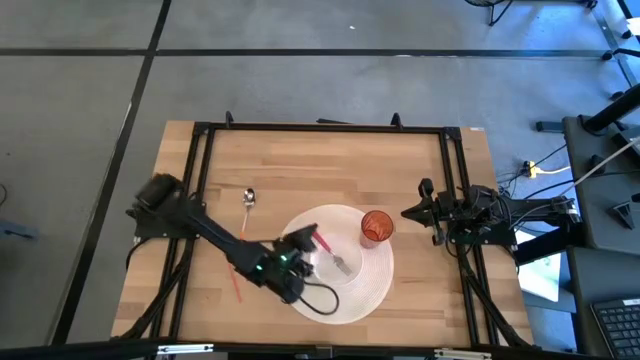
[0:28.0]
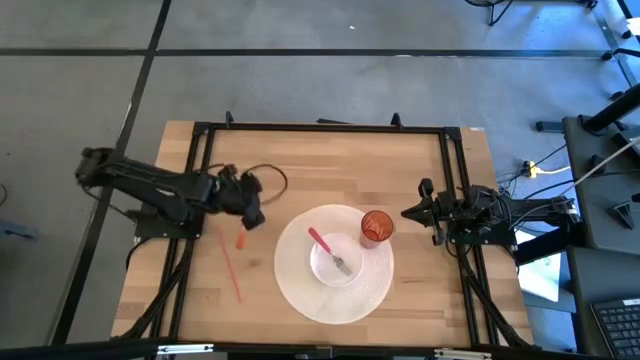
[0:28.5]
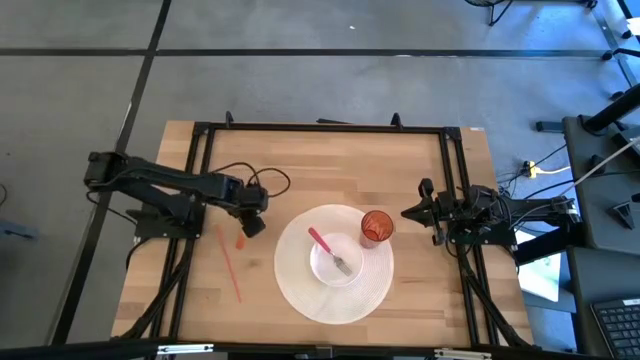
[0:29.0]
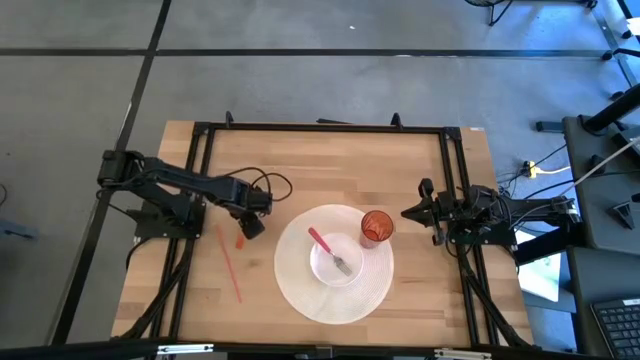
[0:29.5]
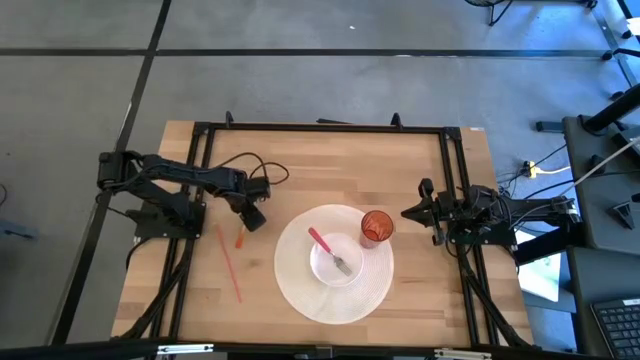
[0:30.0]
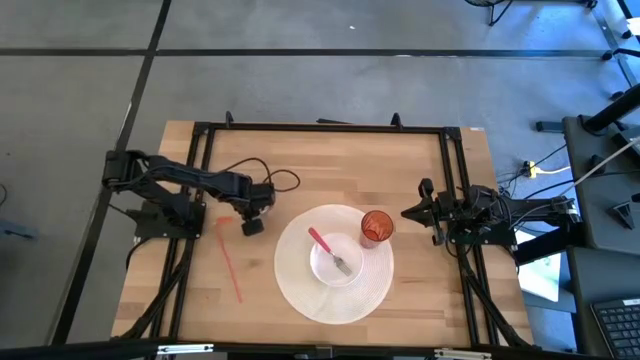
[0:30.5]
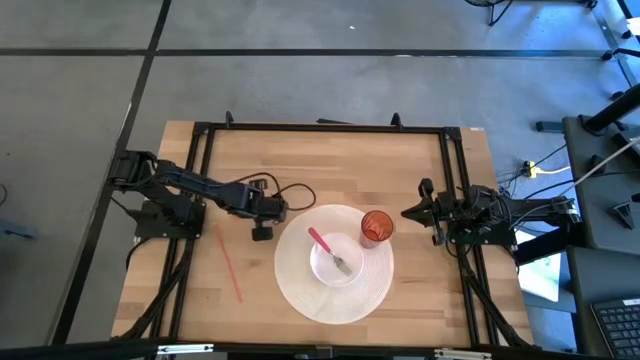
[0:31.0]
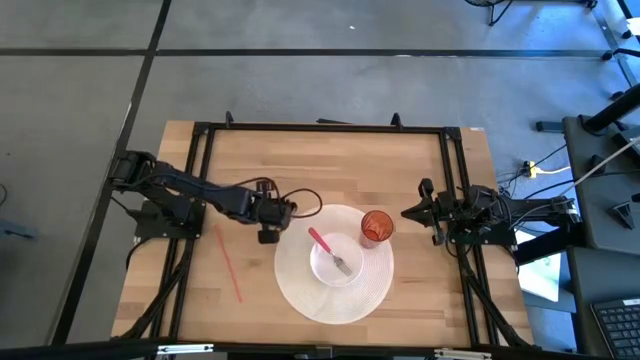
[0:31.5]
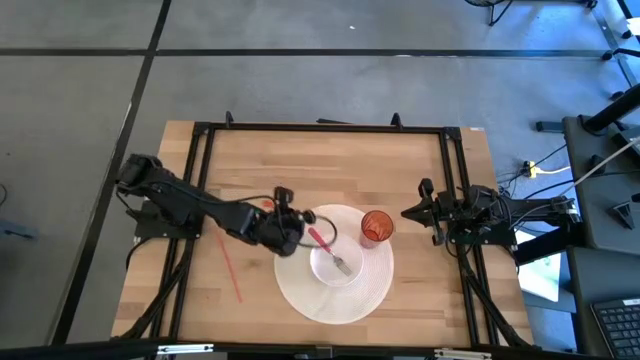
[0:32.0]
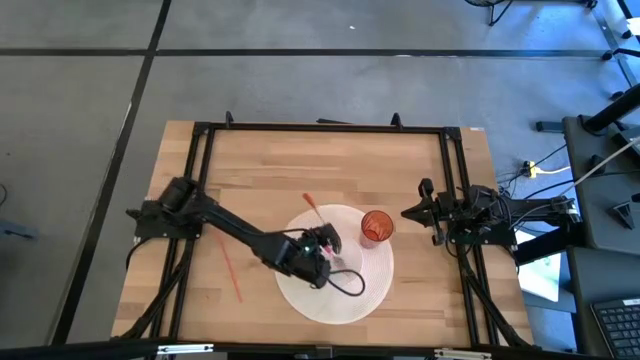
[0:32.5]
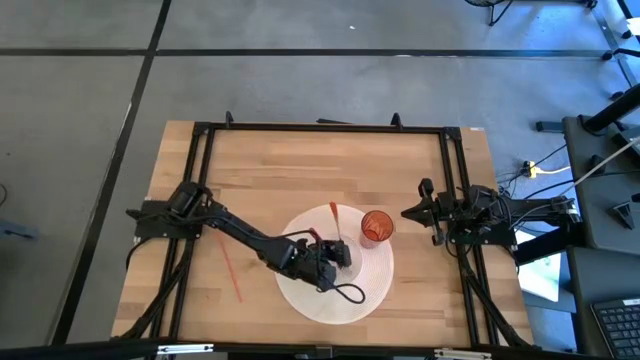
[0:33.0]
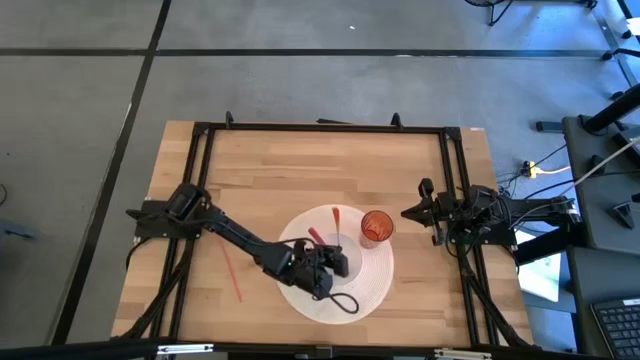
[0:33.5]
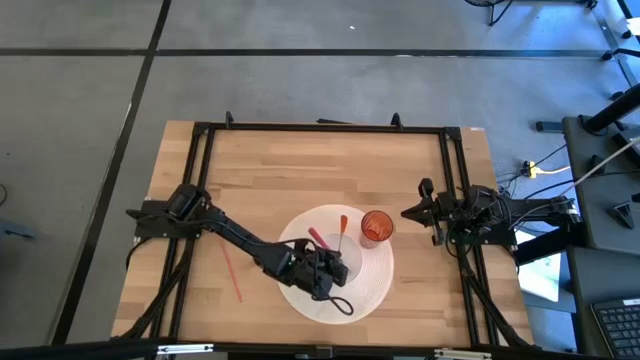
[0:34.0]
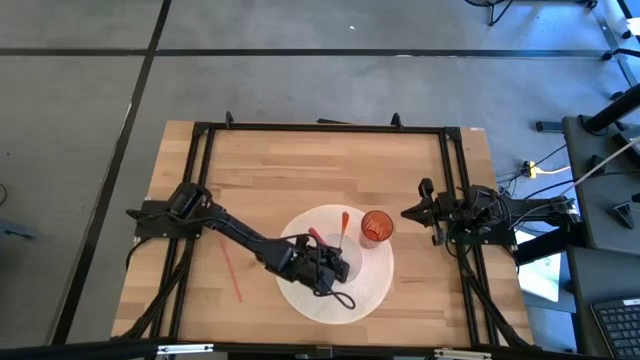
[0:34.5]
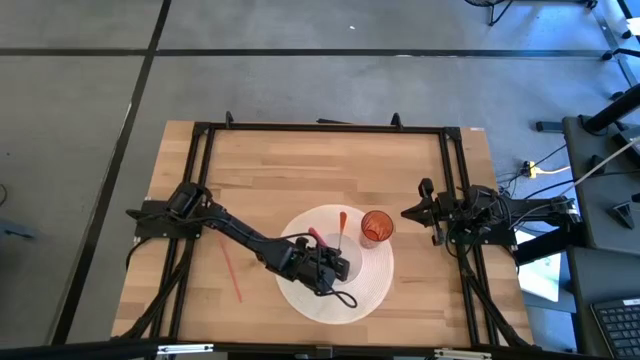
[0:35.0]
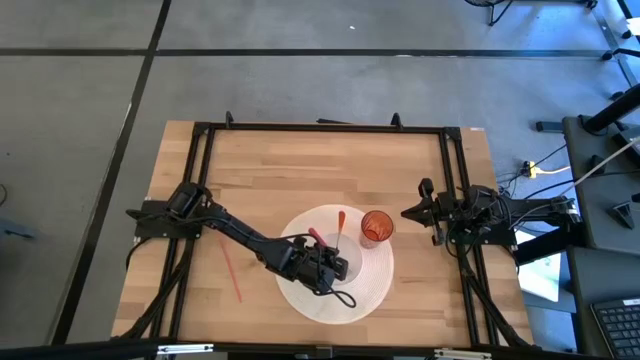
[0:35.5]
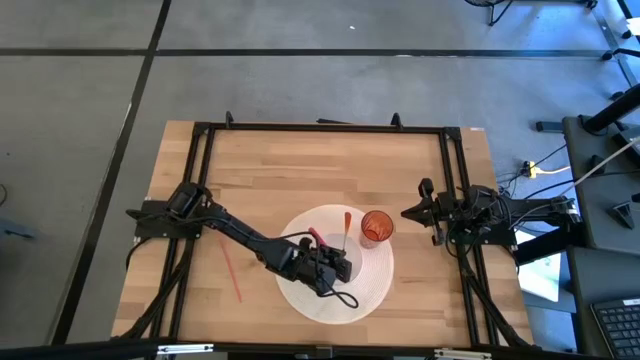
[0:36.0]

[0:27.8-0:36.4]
Task: Pick & Place Utensil
Put the orange spoon into the white bowl

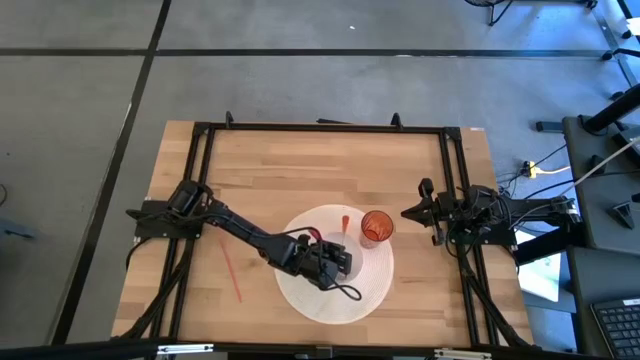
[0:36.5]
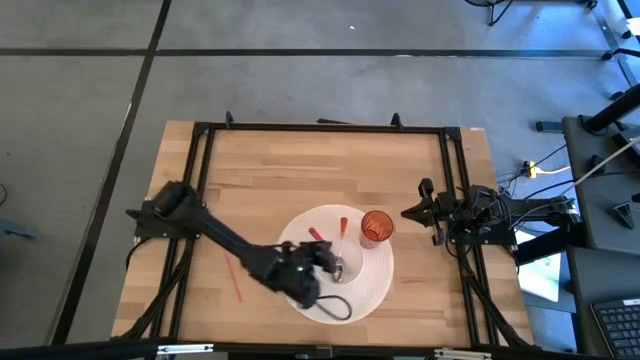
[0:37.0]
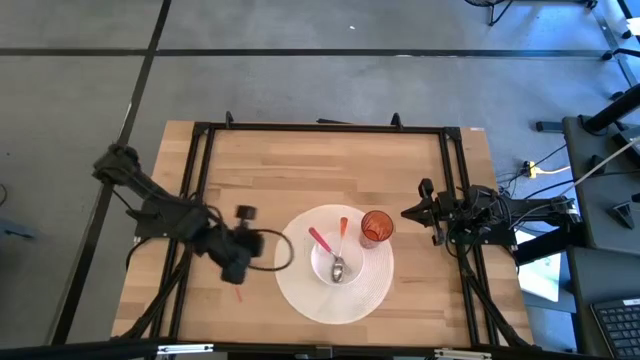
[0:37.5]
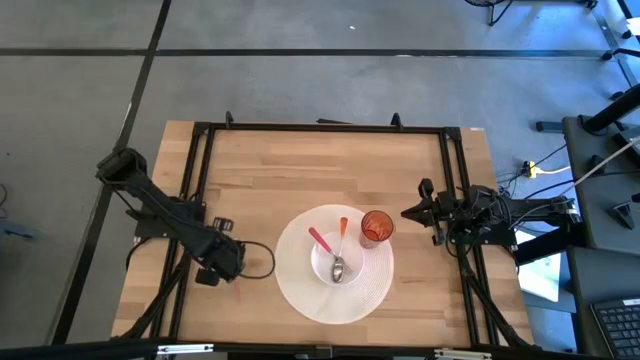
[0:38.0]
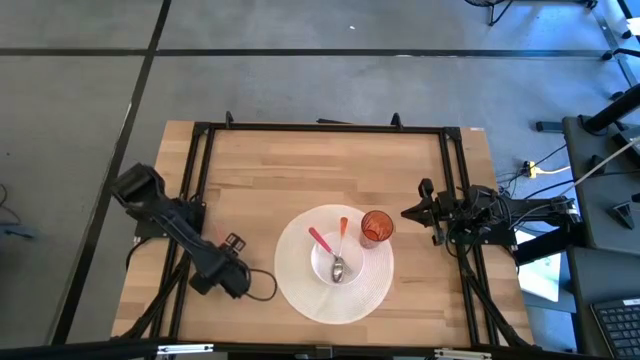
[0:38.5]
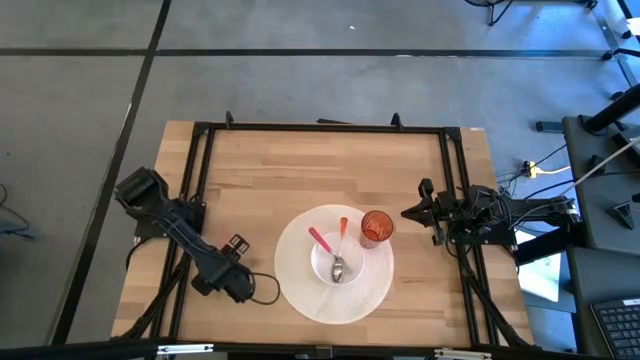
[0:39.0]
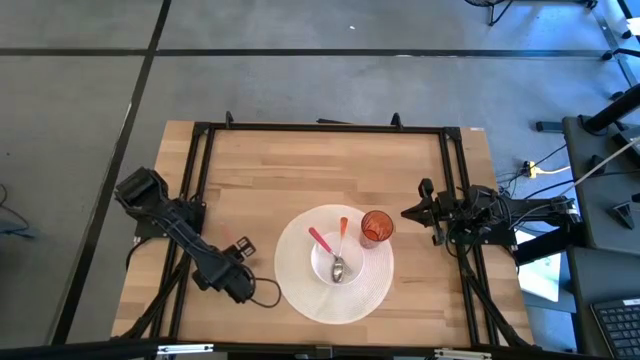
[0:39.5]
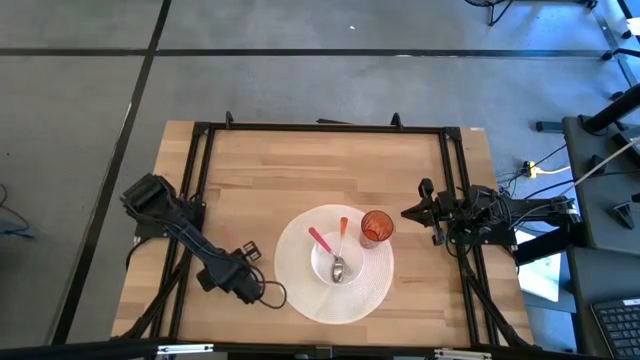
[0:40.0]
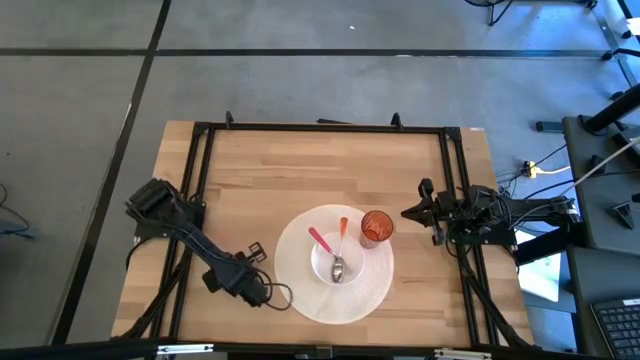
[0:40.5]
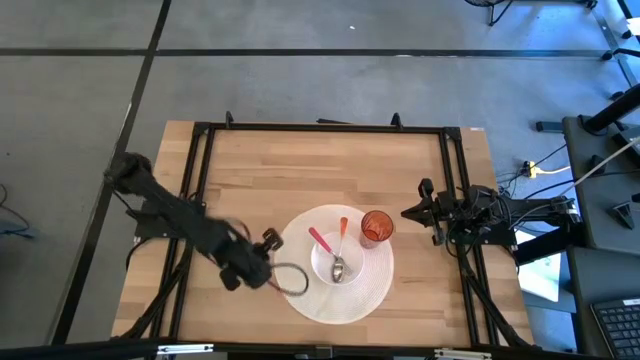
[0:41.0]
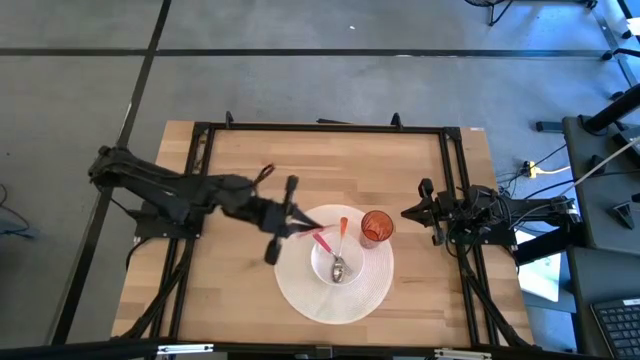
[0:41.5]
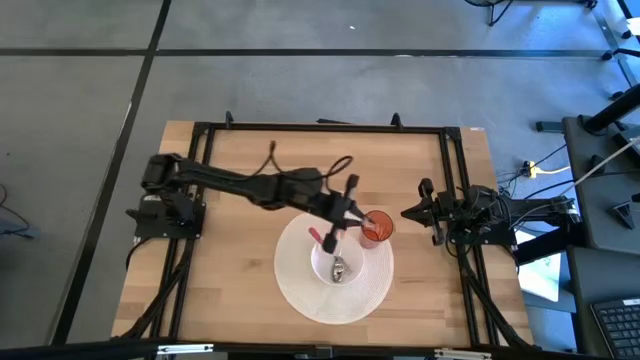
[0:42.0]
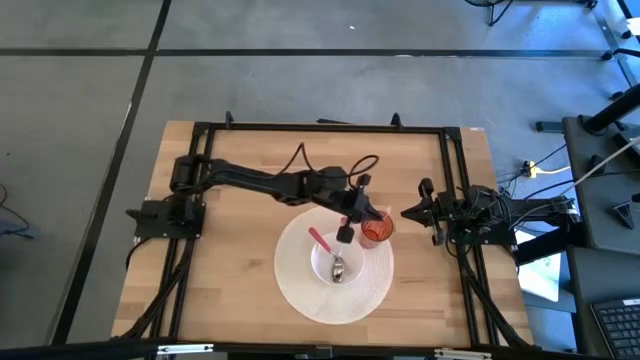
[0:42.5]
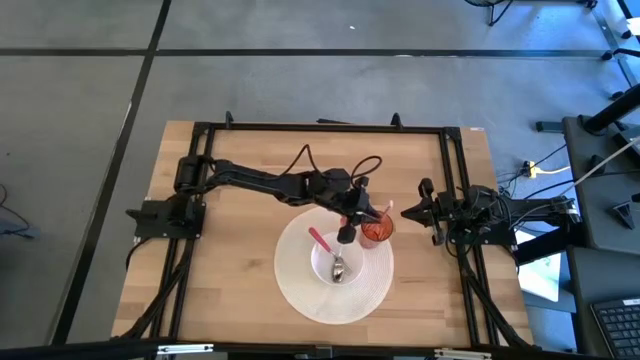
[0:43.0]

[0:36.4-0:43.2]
Put the orange straw into the orange cup

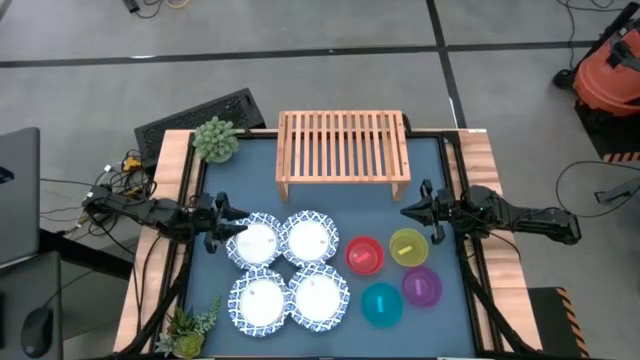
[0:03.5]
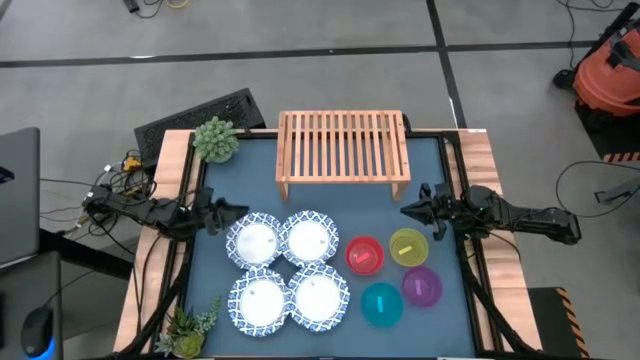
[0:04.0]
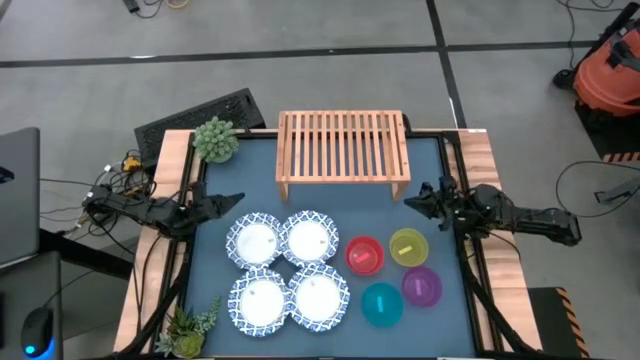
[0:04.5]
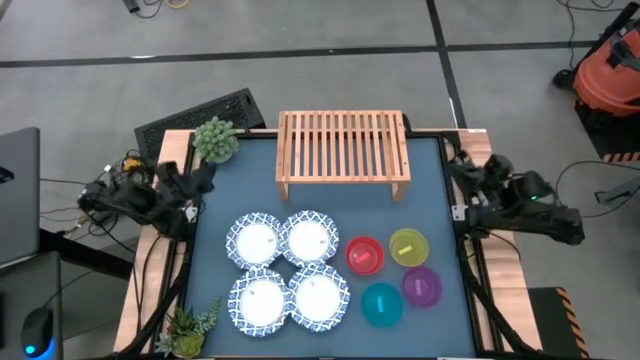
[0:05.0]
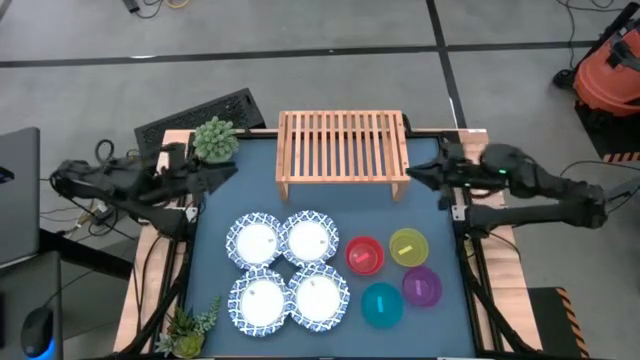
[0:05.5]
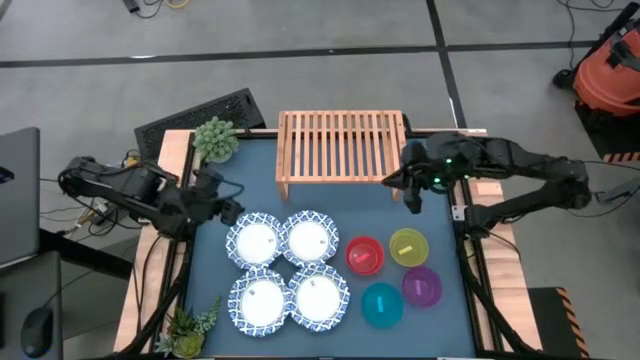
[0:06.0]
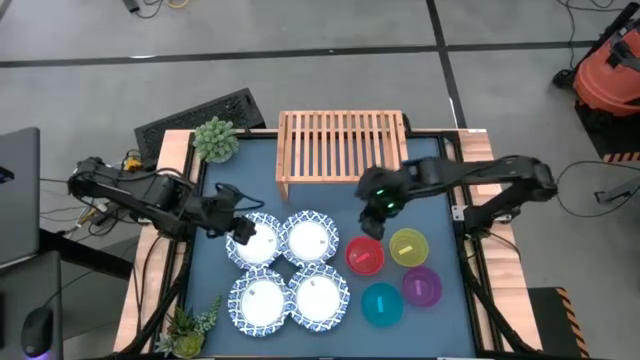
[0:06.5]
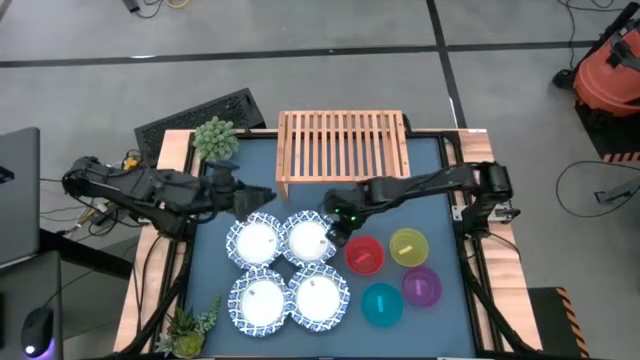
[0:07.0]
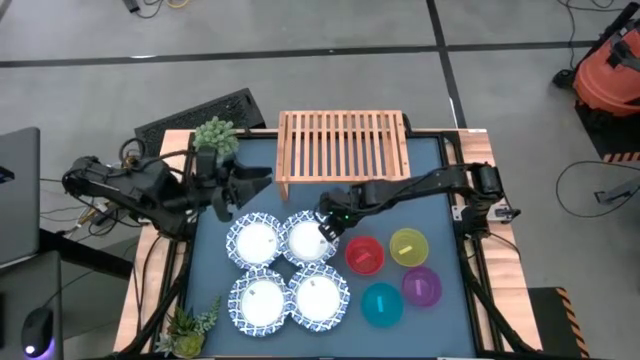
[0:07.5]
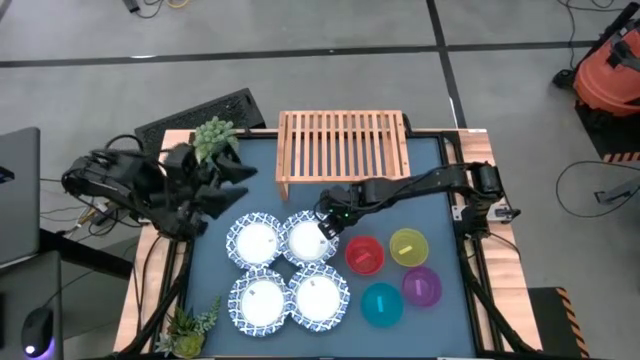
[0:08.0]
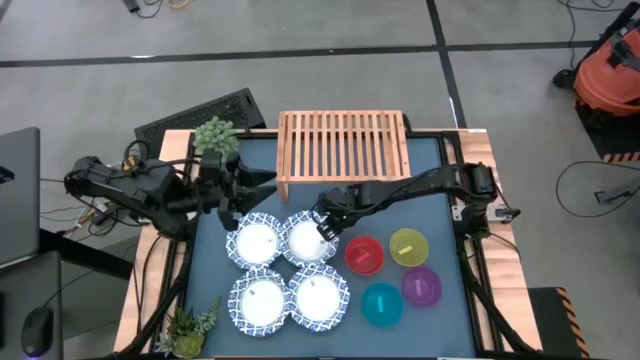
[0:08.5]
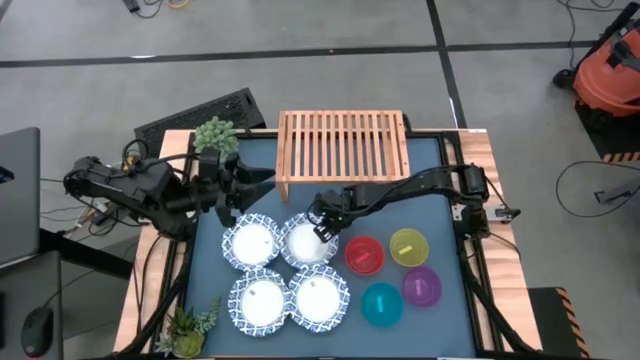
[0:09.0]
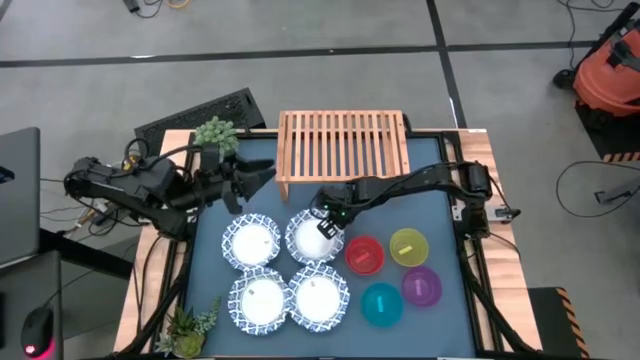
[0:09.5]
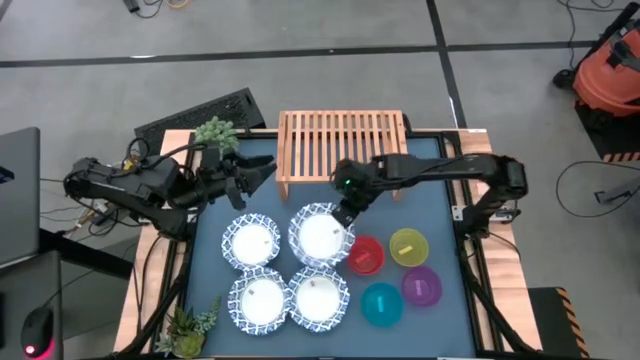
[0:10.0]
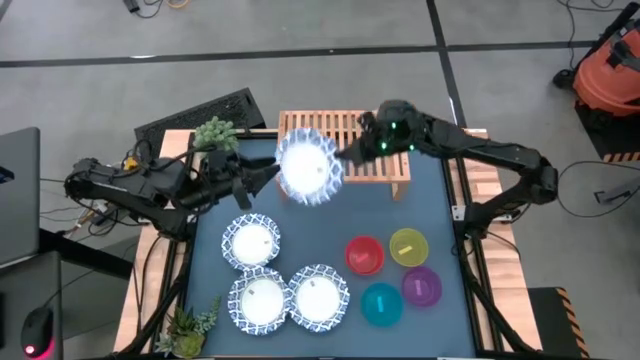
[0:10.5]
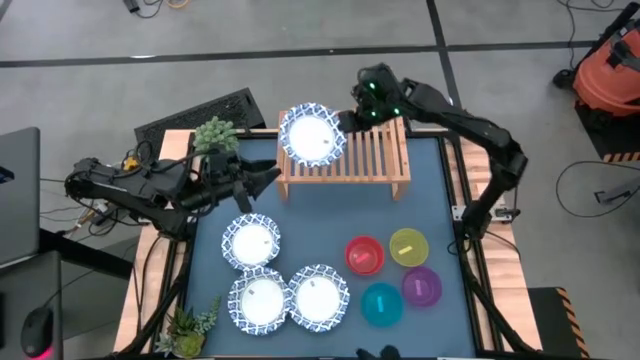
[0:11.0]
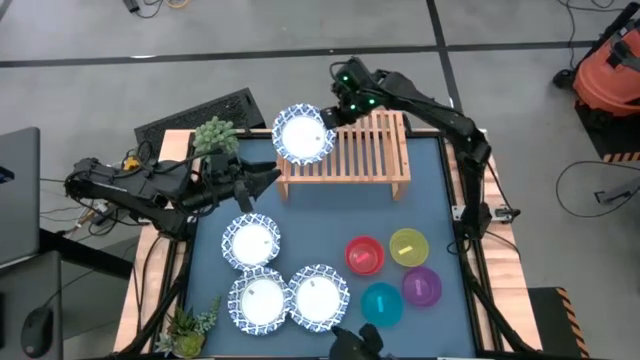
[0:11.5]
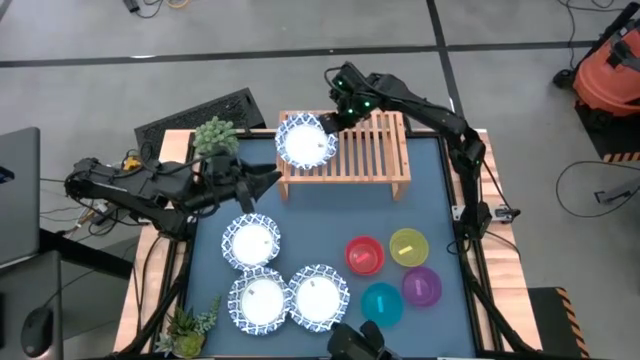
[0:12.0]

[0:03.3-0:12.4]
Task: Place and stack bowls onto a shelf
Put the top right white patterned bowl on the shelf
